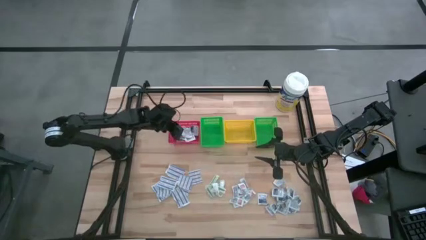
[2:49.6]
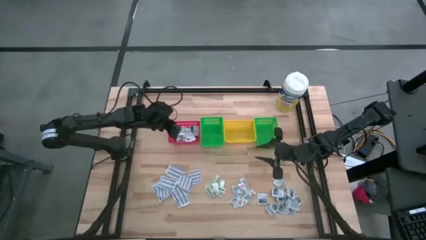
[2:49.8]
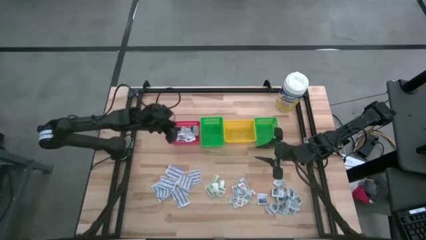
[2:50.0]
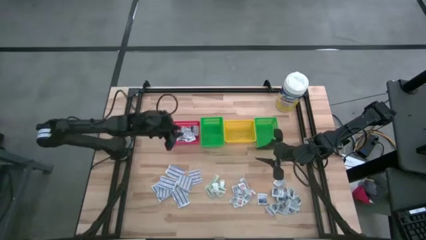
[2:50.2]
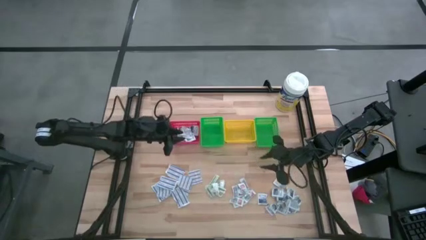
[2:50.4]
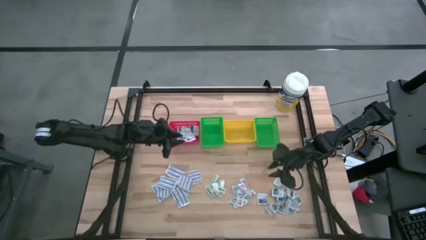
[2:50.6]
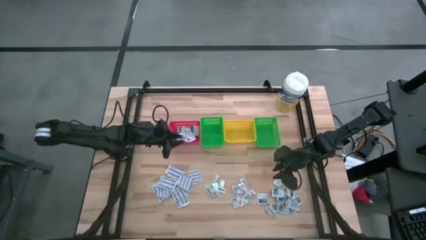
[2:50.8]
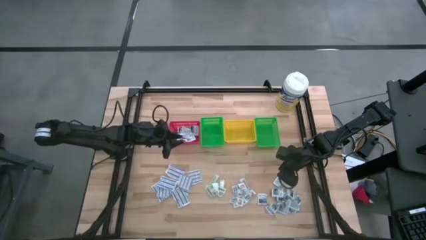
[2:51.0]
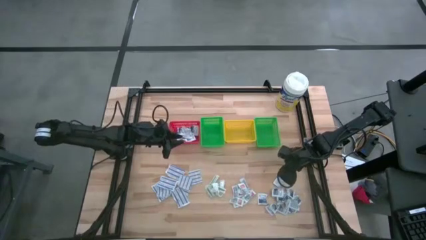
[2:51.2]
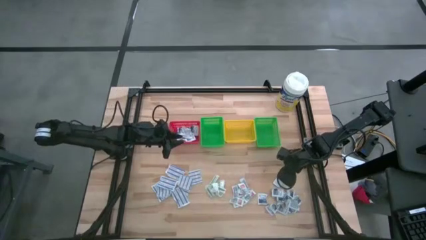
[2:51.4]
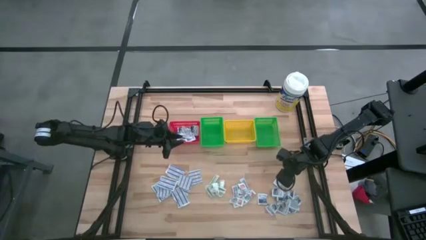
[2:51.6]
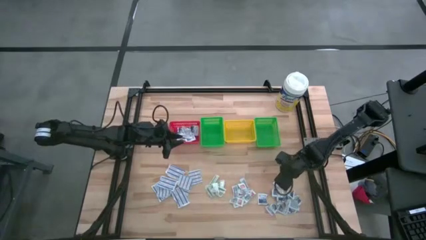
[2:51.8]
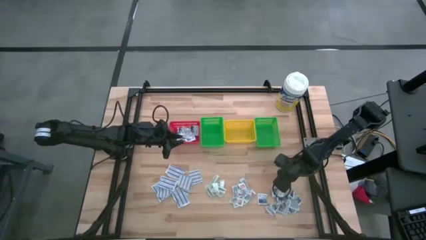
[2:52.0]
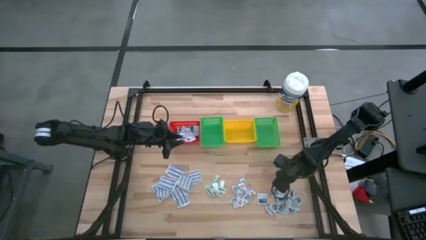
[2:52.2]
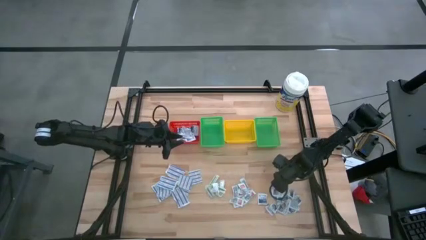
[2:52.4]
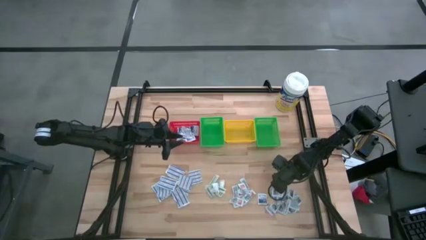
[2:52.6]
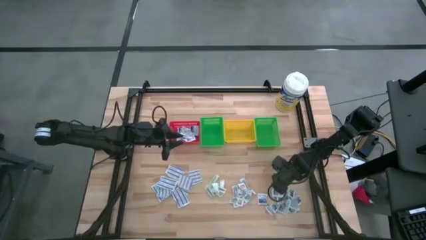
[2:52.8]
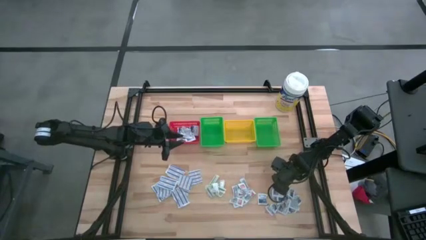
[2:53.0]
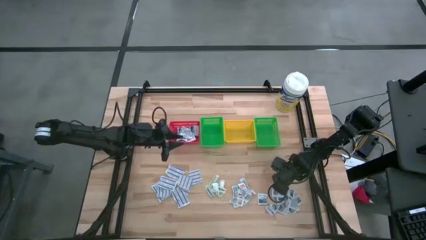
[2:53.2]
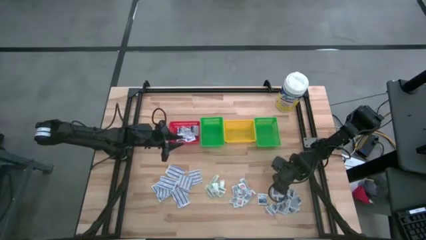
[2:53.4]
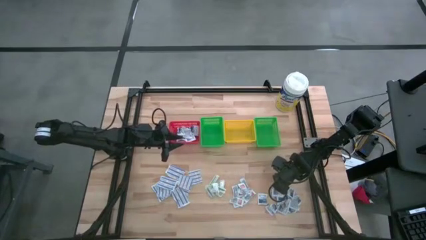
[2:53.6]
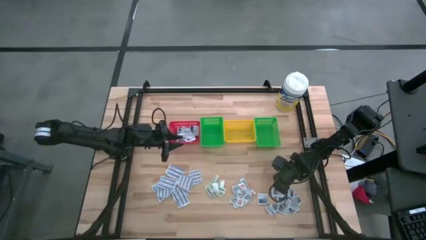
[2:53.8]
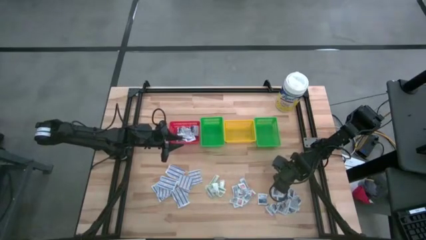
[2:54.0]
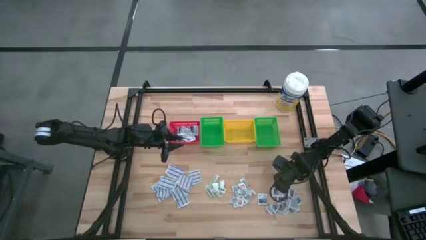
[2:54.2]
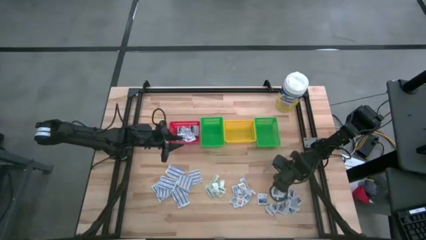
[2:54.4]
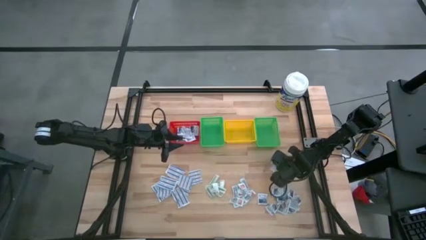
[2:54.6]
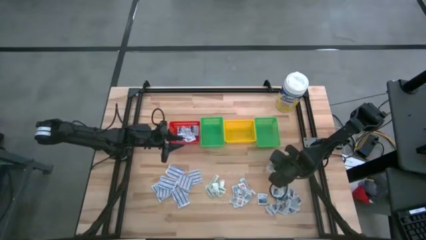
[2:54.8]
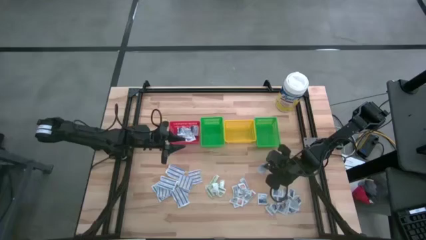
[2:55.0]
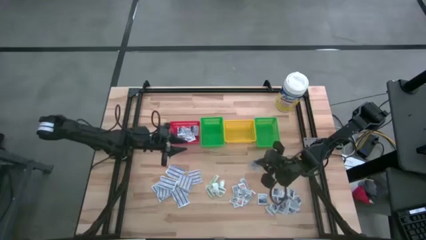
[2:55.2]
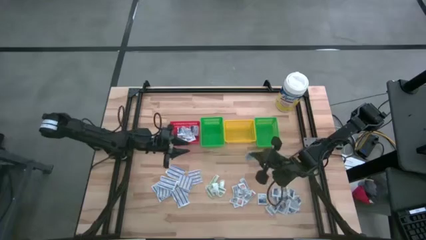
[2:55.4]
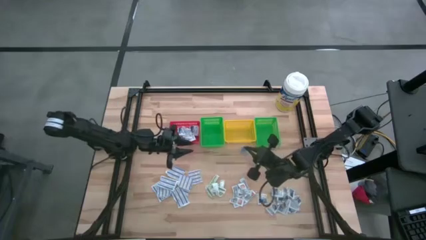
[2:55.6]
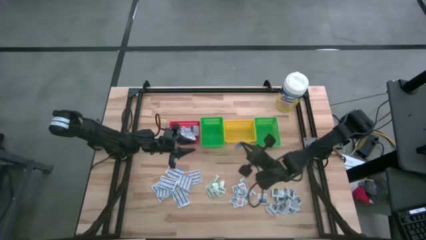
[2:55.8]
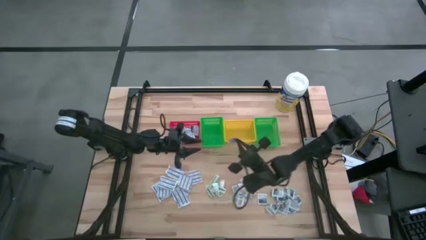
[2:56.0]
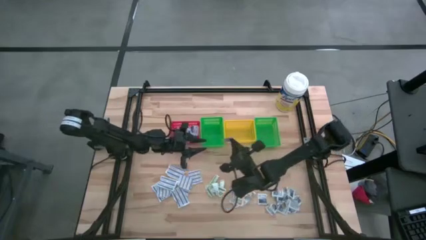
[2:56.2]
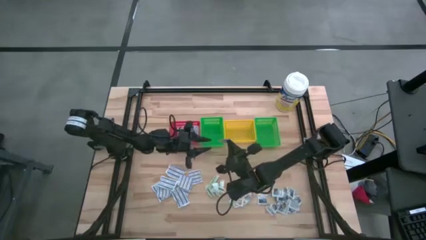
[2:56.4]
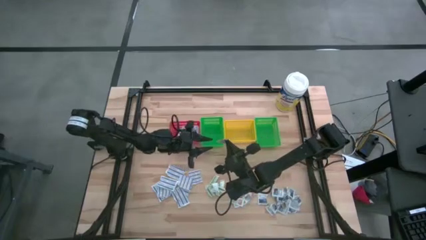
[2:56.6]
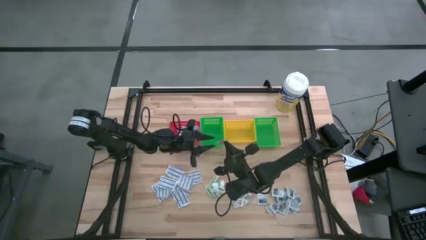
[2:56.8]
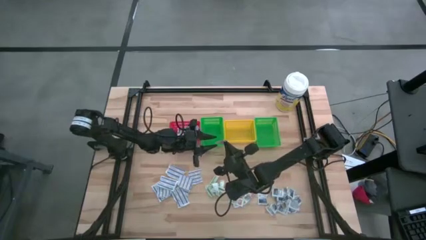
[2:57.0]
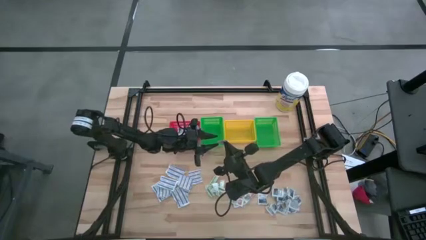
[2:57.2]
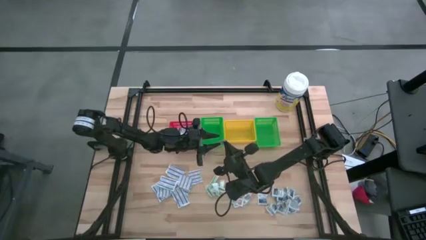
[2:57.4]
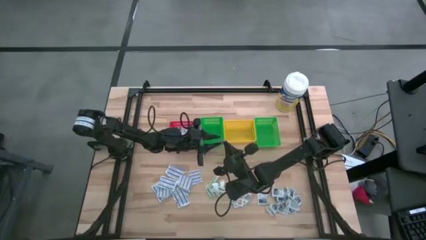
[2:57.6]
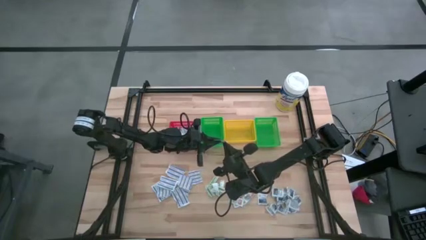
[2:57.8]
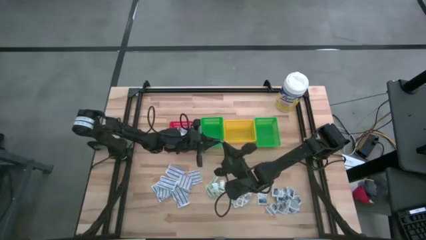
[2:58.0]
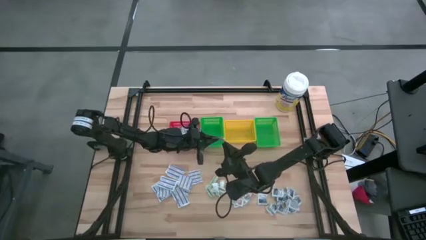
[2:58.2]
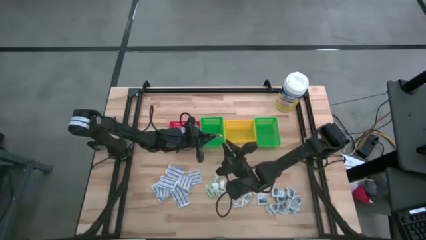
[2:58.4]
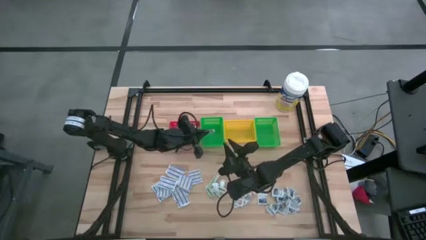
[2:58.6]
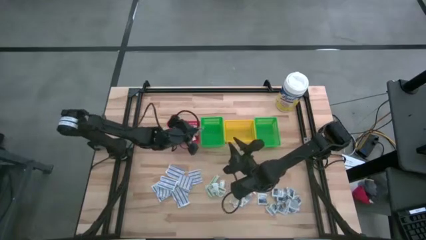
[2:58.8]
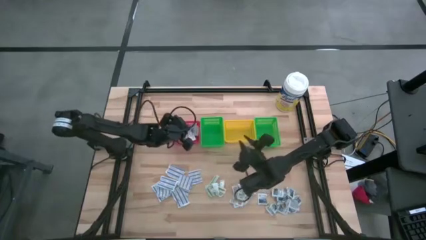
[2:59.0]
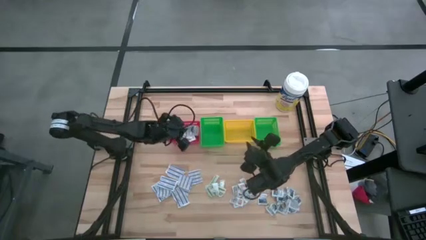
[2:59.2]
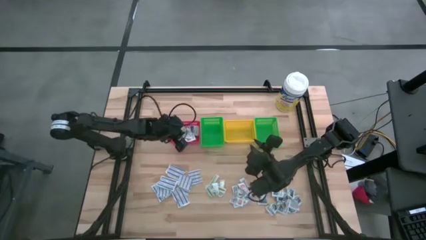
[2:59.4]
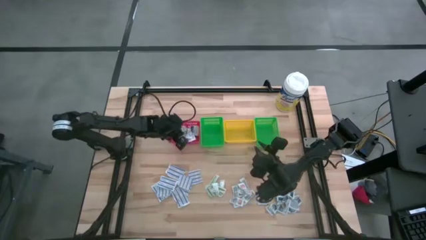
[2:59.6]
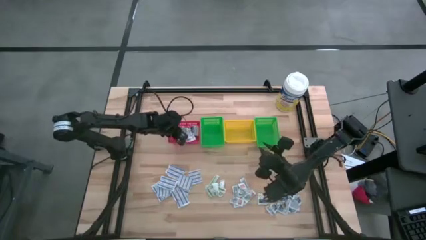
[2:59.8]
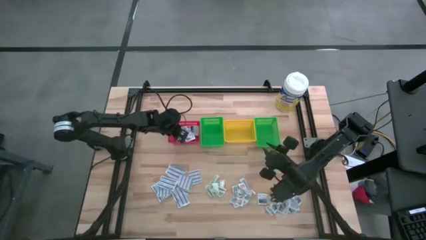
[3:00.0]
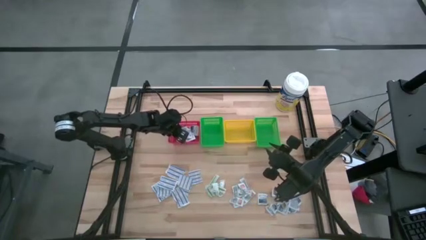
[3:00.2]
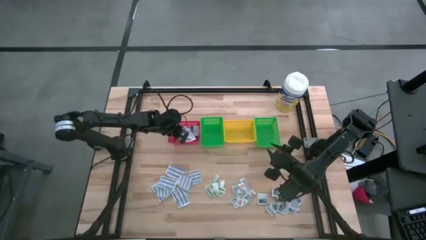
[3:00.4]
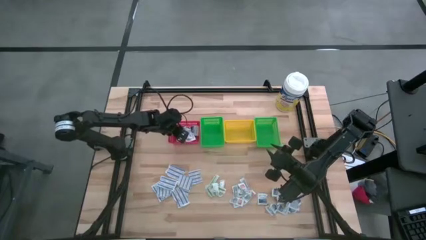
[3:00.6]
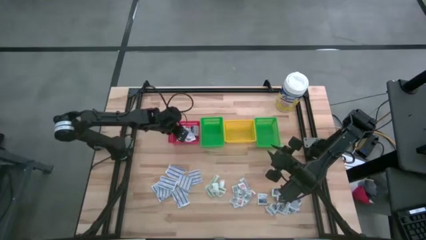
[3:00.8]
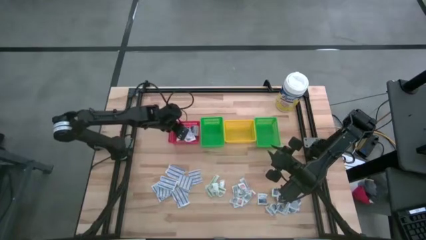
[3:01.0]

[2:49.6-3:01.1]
Task: Pick & Place First Aid Supplies
Put the alcohol pad into the red basket
